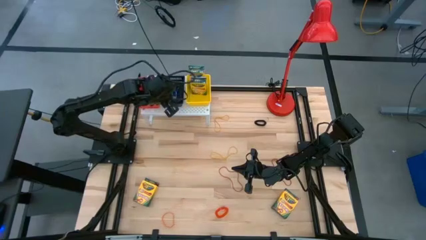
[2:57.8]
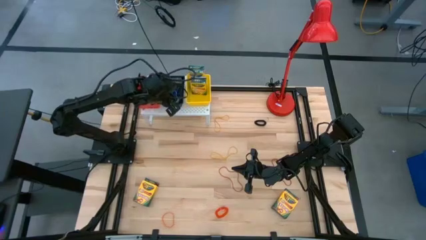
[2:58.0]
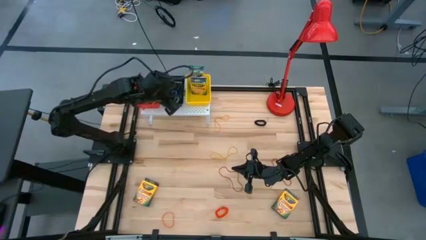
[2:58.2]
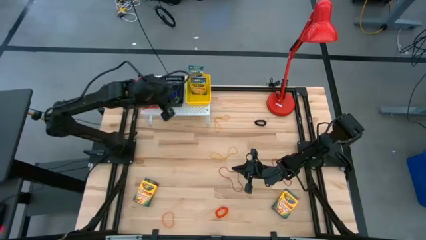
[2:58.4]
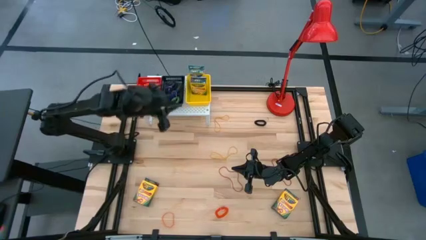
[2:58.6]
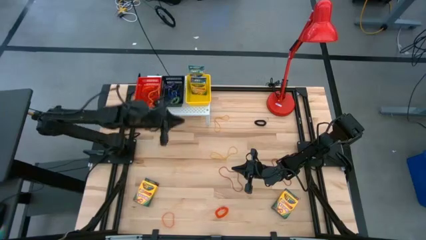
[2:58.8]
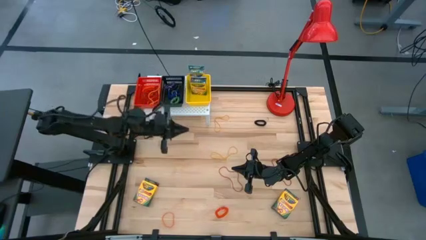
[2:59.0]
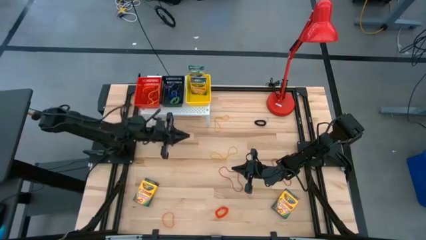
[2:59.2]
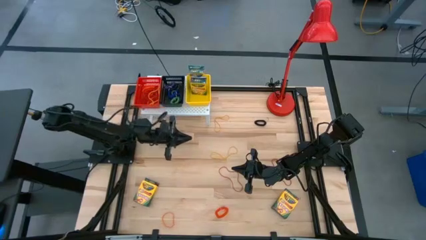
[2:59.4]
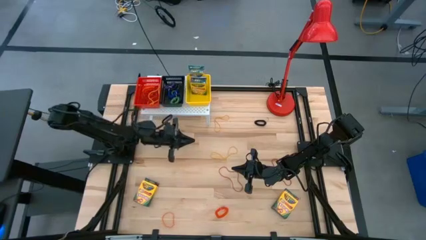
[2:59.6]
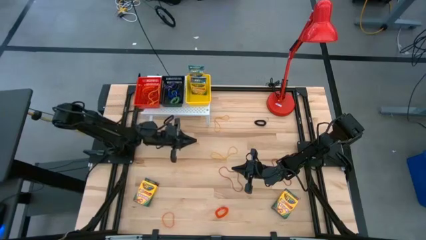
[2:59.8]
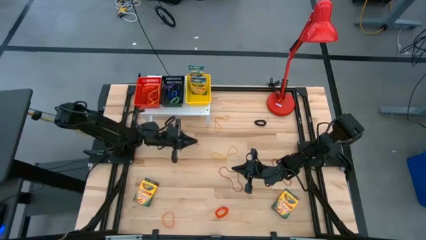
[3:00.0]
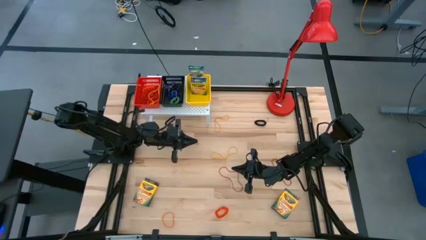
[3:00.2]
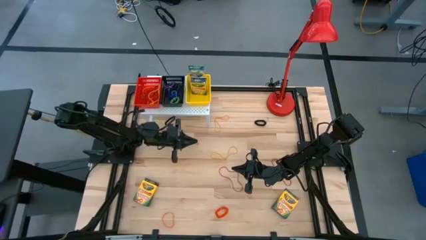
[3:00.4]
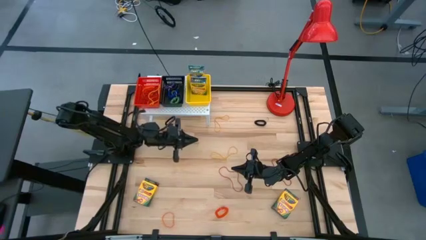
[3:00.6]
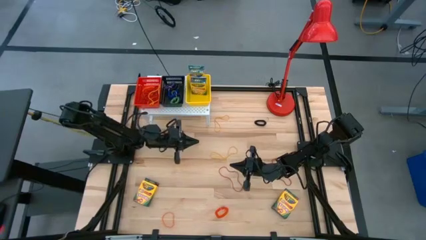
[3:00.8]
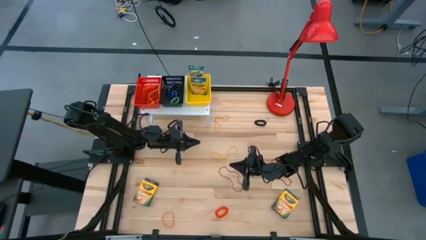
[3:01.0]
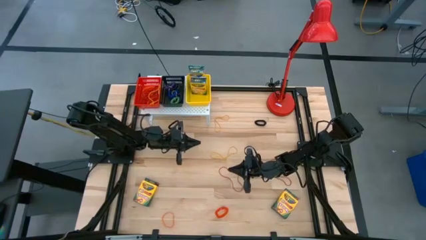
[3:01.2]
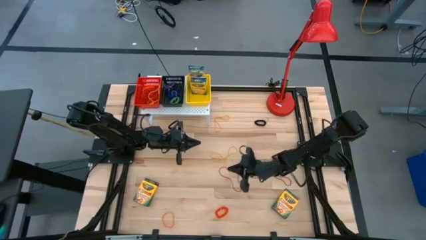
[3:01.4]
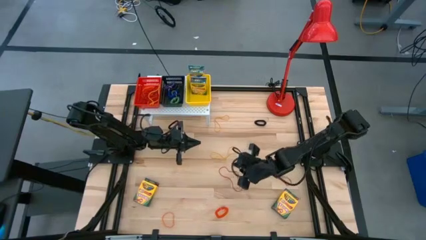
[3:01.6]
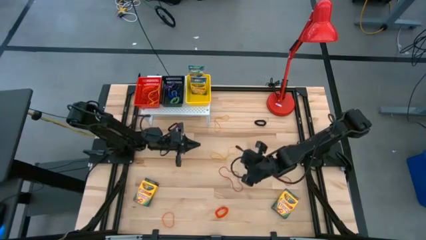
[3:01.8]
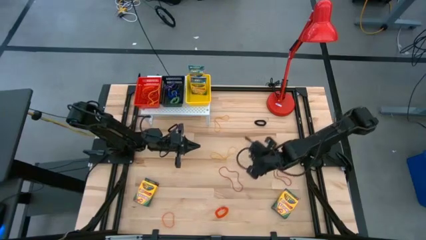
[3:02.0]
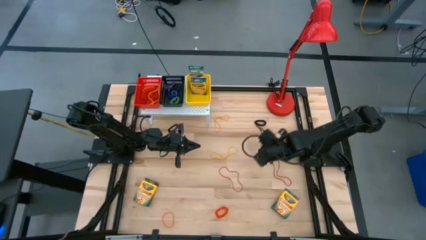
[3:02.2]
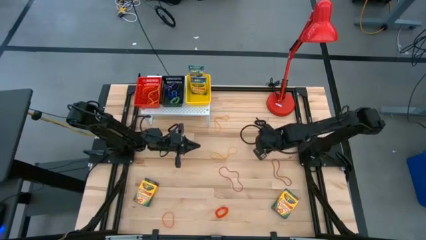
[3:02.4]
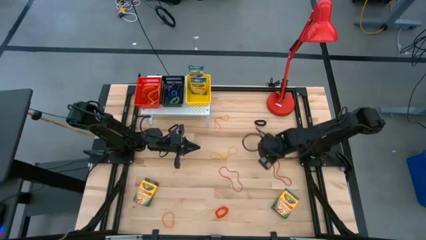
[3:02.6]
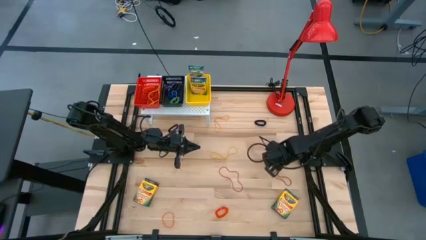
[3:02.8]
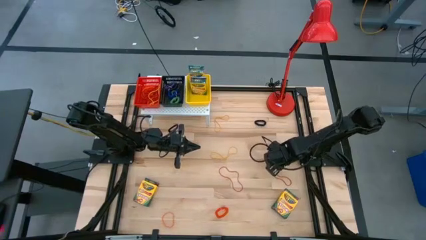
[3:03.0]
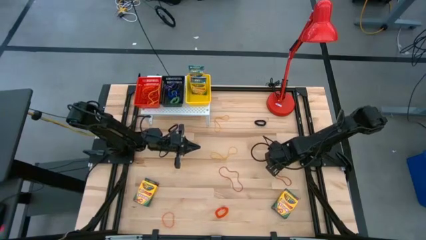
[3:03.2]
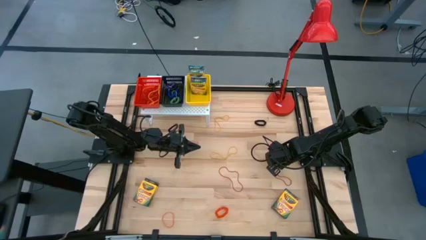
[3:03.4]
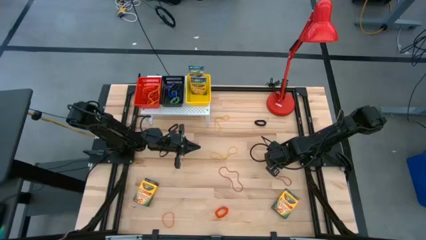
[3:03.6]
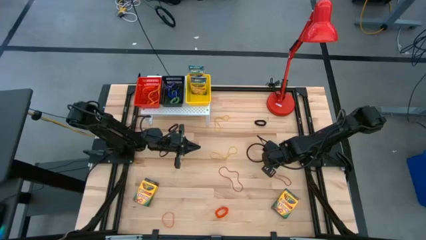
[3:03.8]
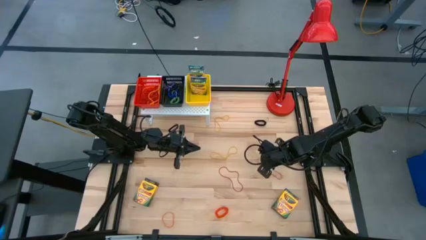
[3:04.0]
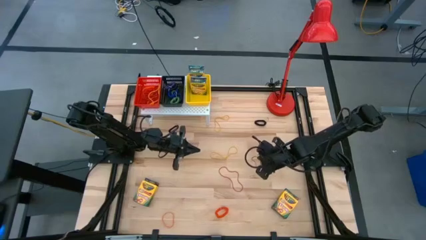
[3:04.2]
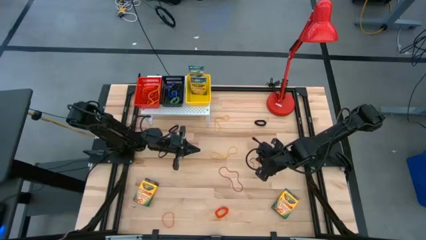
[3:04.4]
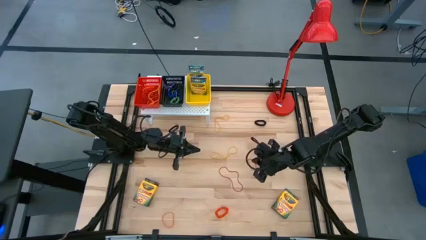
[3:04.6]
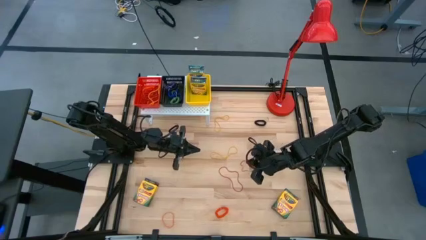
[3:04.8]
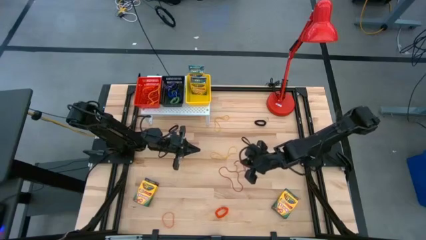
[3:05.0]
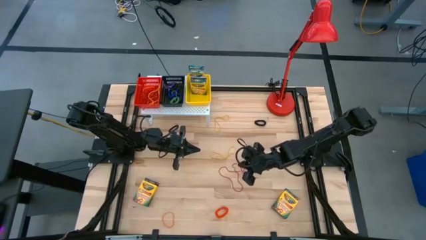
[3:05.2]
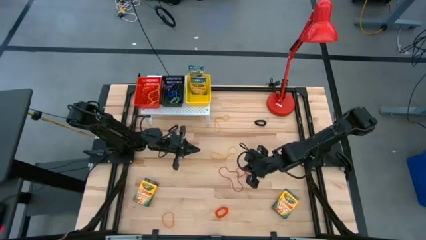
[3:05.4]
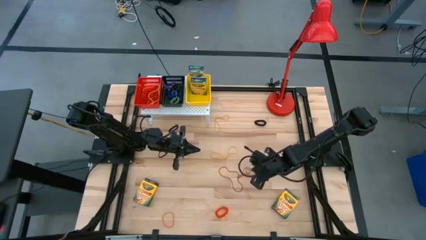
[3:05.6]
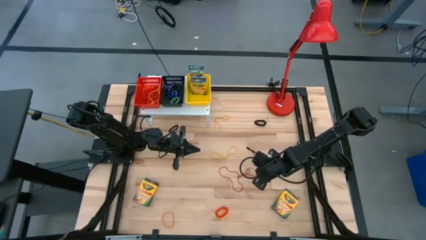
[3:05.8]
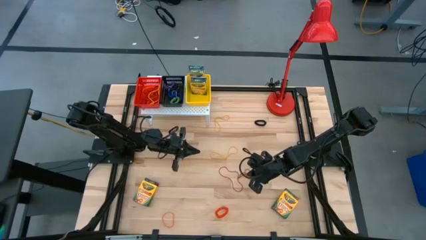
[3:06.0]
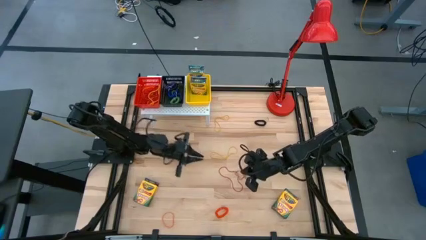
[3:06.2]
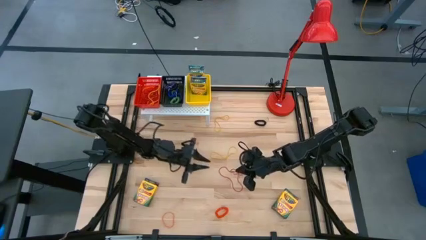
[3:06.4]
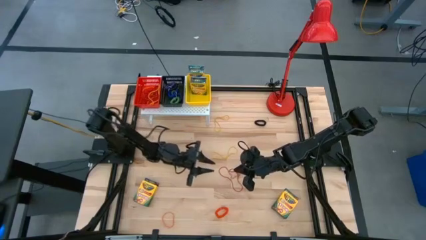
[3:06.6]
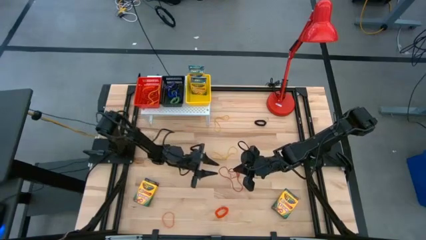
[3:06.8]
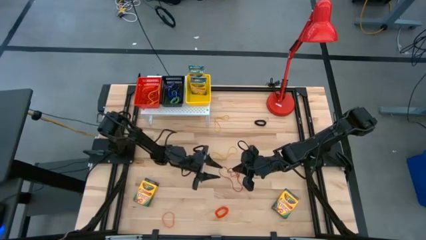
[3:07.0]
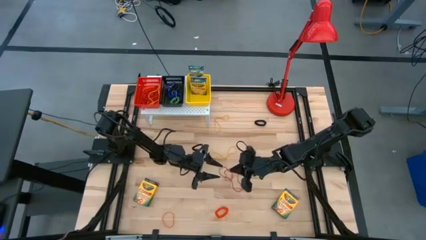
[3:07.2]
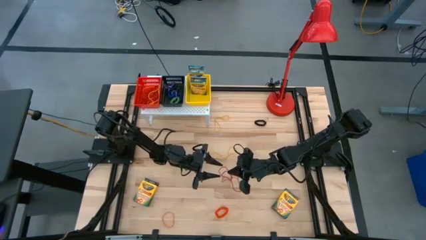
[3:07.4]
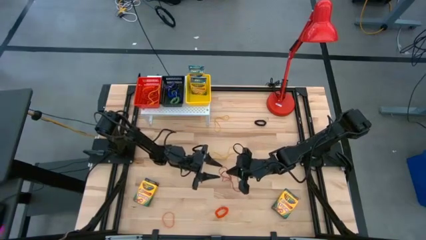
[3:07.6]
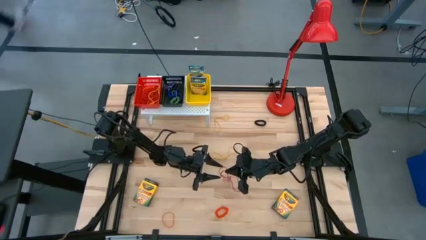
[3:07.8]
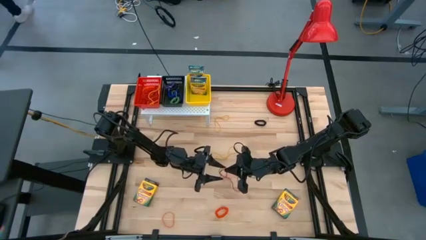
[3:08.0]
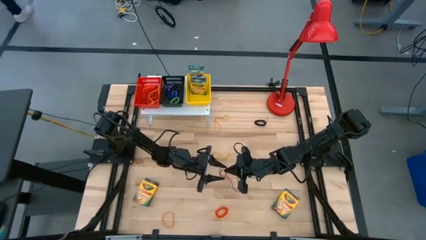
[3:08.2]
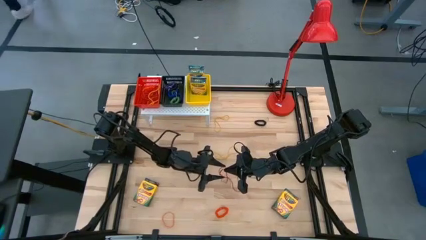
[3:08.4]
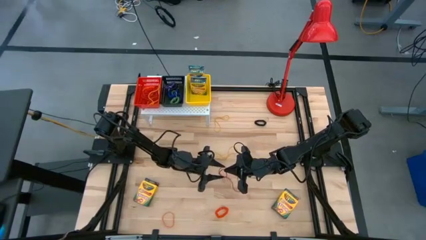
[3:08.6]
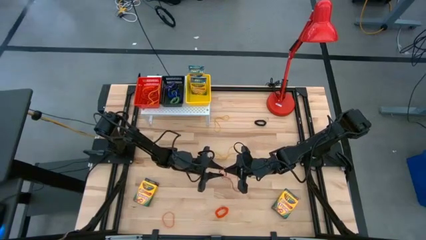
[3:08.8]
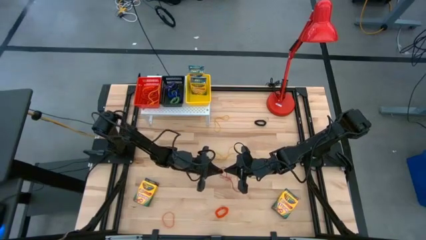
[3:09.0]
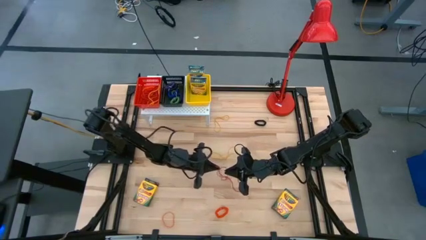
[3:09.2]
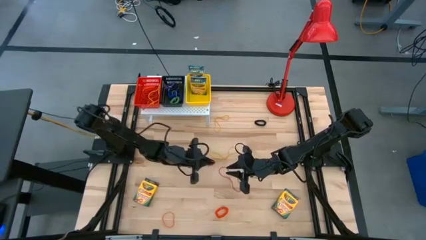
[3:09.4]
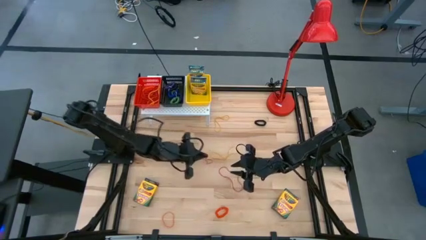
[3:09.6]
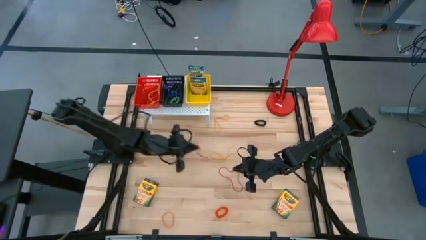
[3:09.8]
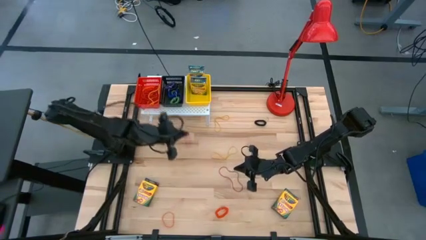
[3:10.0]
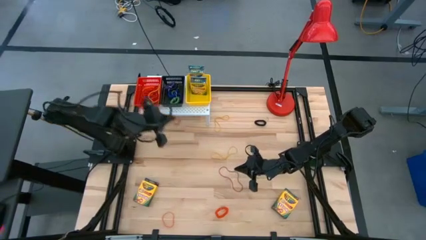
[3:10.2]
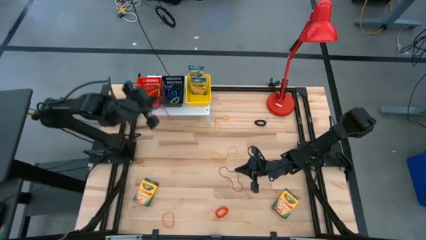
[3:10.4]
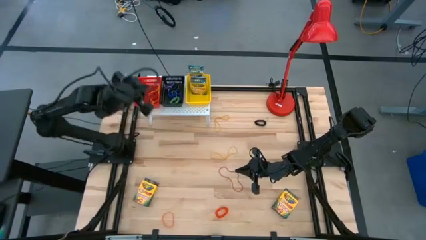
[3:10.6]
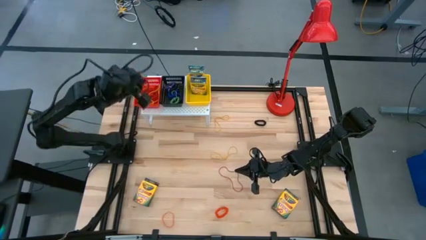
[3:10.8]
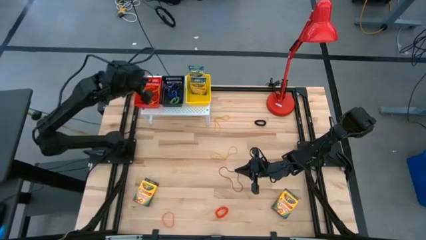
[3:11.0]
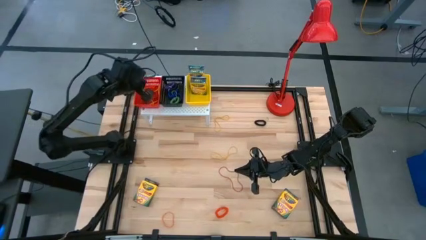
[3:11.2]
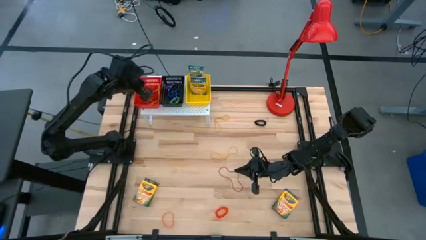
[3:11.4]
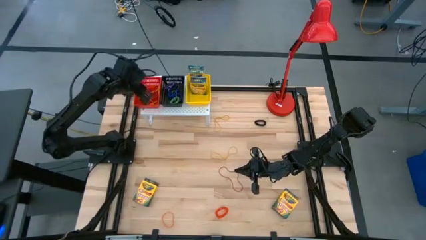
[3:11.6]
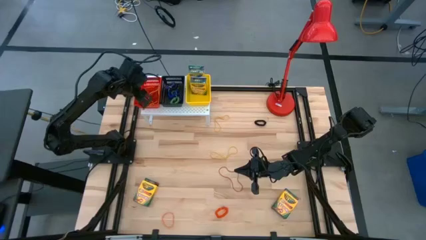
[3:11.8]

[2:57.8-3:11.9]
Task: Pick & Place Office Desk Supplies
Put the red rubber band into the red bin on the shelf

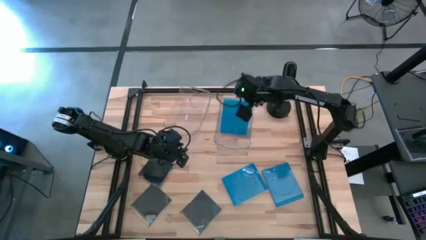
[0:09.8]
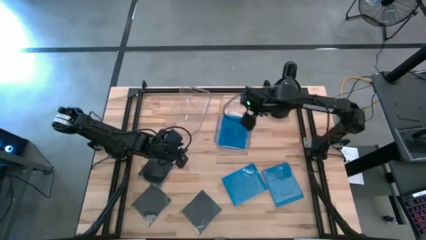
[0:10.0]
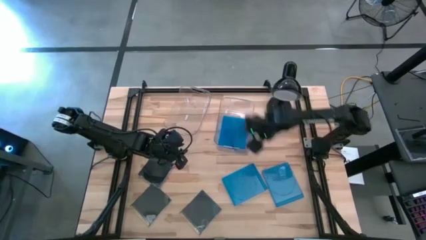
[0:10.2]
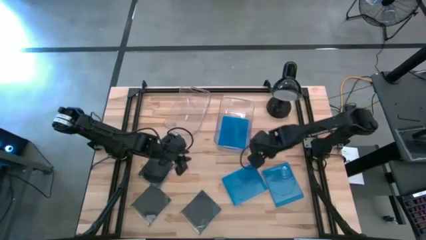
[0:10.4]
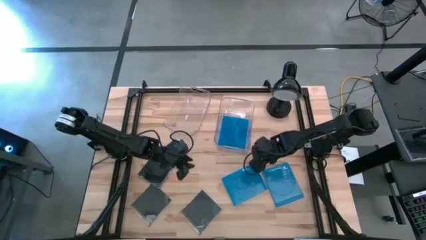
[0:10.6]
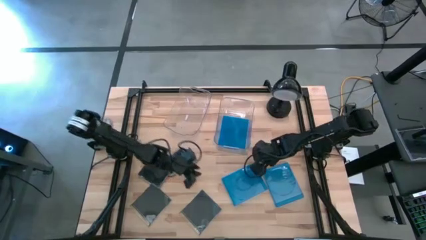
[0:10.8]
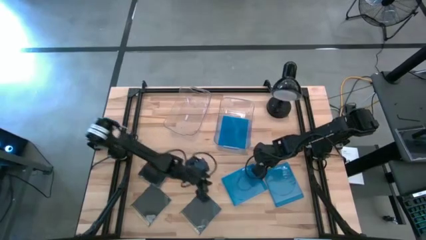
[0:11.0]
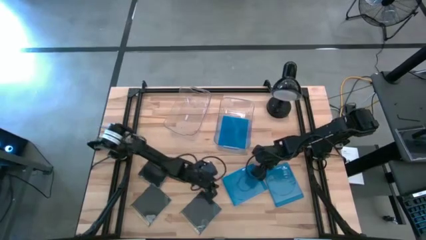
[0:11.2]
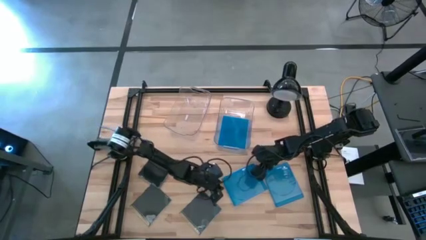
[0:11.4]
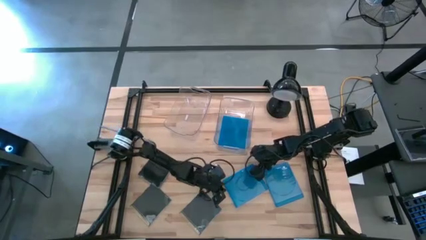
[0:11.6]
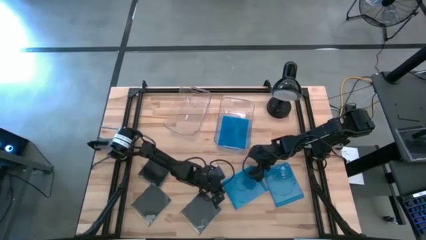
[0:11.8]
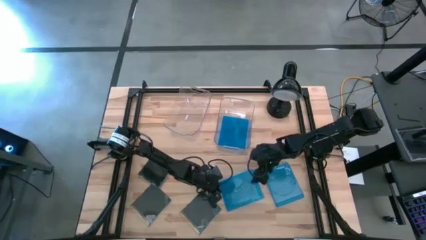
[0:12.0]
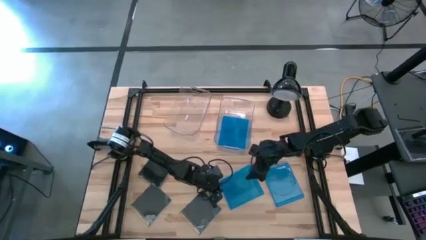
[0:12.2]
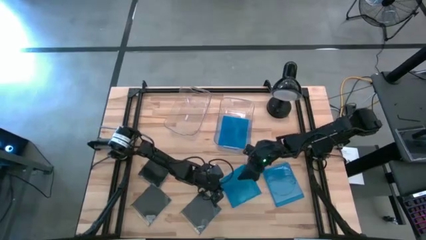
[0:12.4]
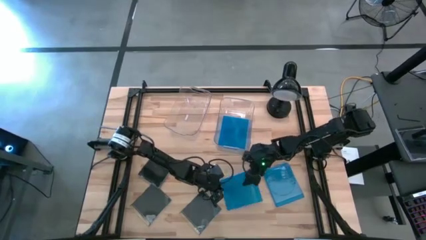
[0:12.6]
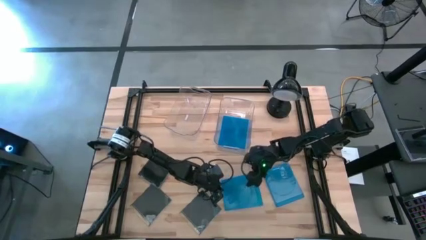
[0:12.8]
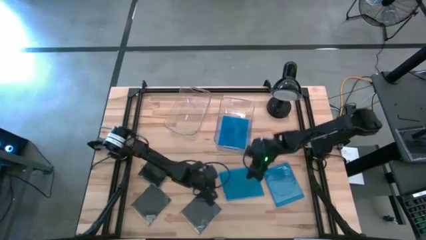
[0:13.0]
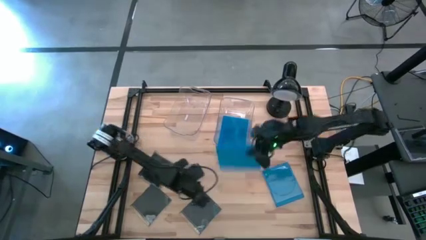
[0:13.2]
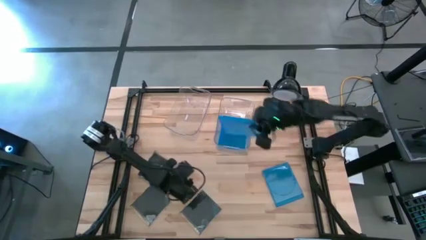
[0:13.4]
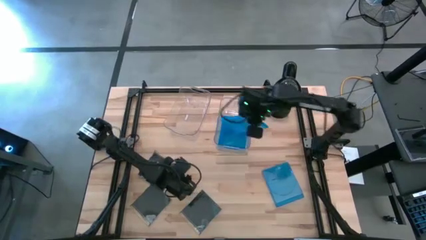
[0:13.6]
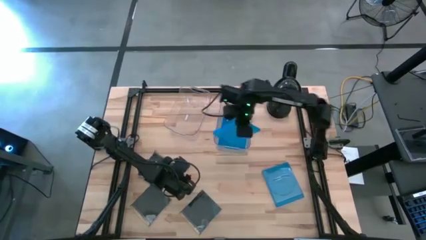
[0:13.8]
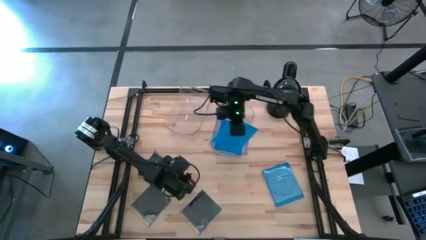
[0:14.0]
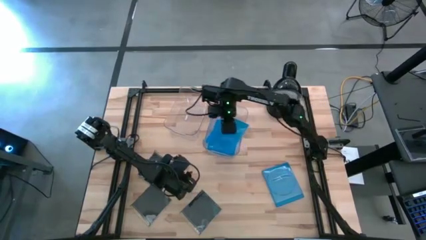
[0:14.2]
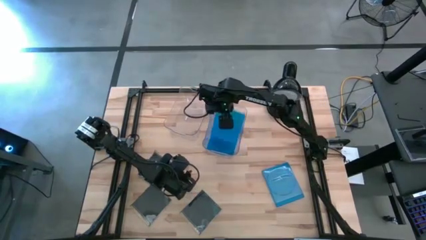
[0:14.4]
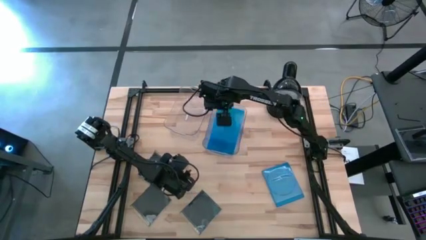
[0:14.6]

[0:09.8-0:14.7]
Task: Pick & place jewel cases by type
Put the left blue CD case into the right transparent bin
